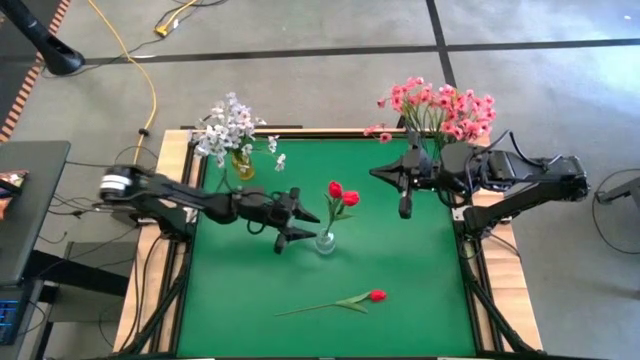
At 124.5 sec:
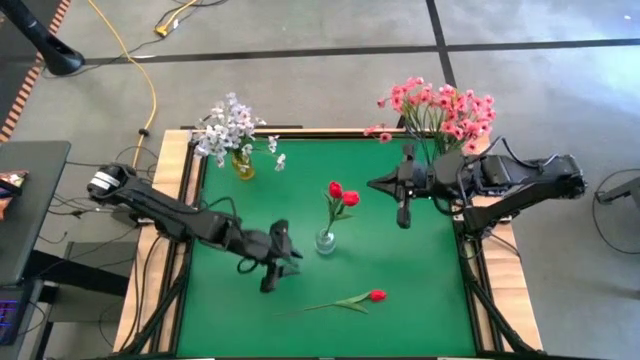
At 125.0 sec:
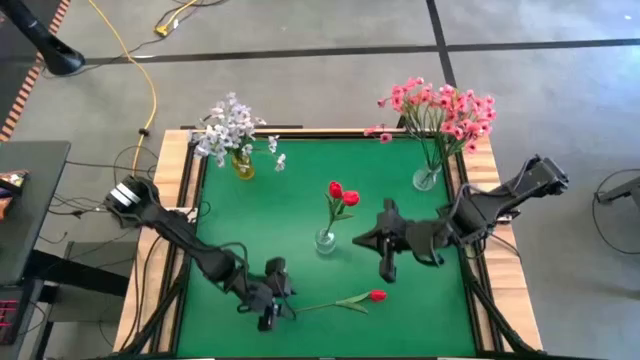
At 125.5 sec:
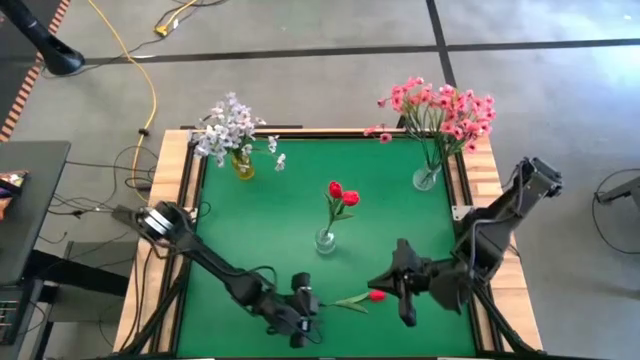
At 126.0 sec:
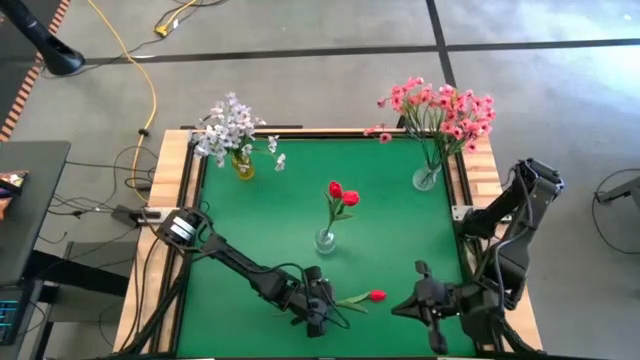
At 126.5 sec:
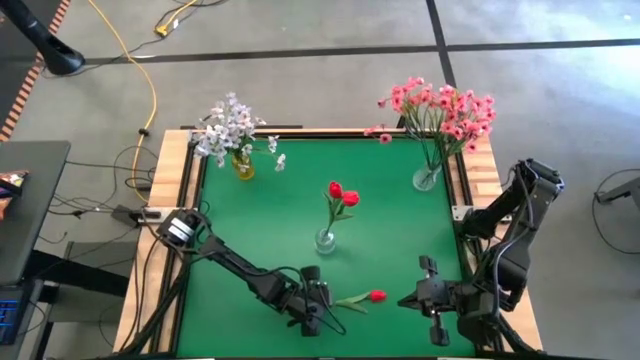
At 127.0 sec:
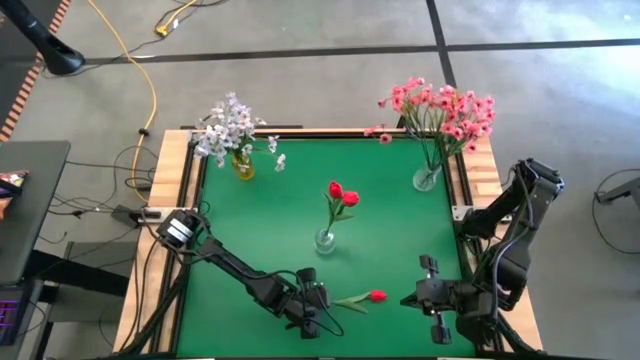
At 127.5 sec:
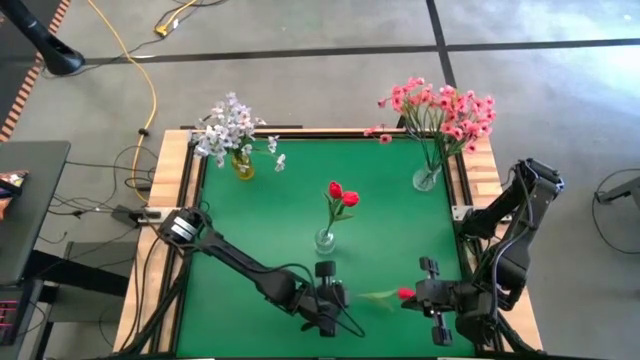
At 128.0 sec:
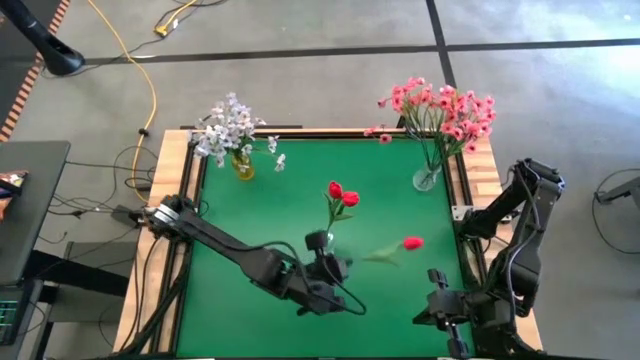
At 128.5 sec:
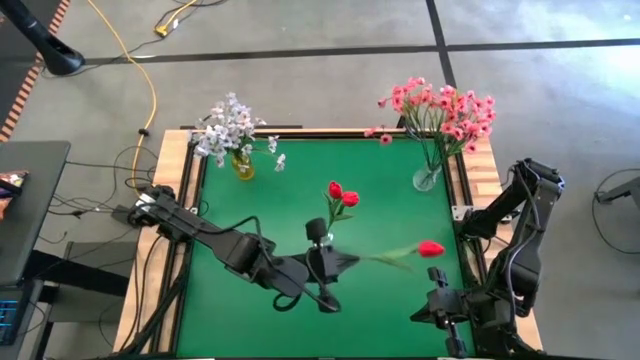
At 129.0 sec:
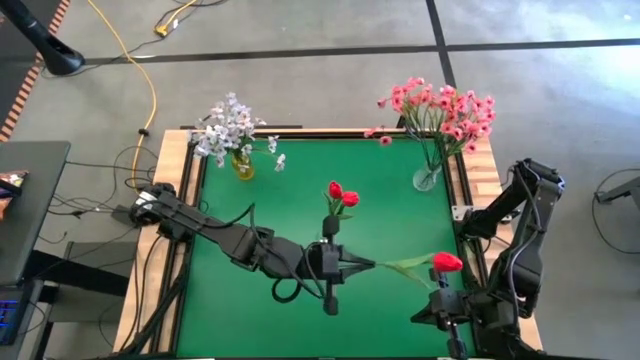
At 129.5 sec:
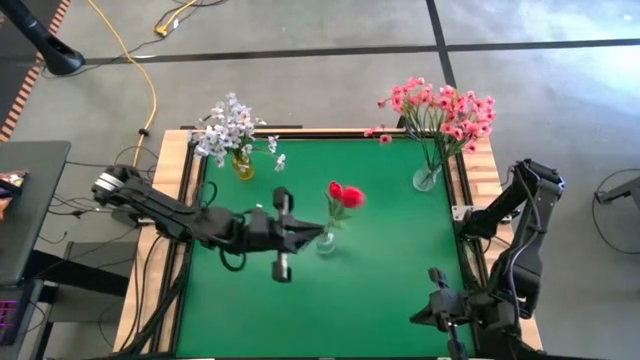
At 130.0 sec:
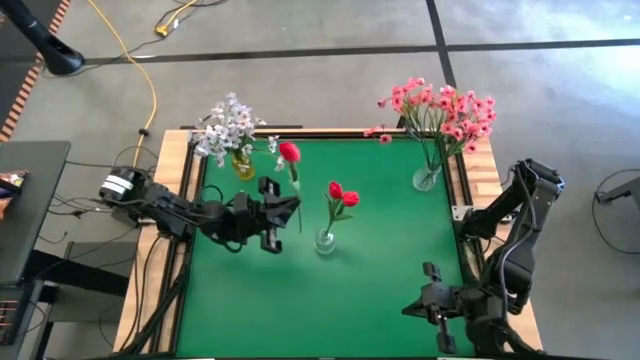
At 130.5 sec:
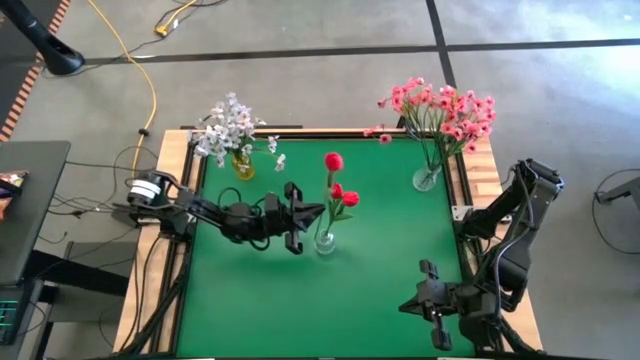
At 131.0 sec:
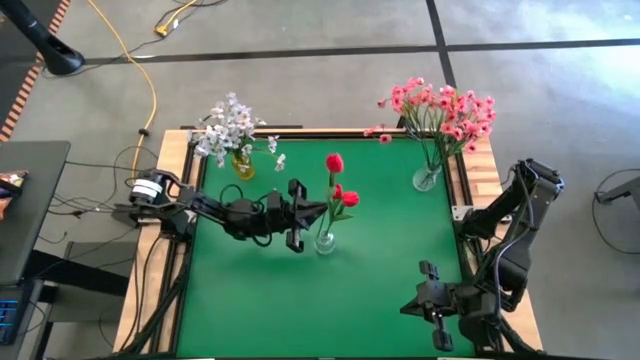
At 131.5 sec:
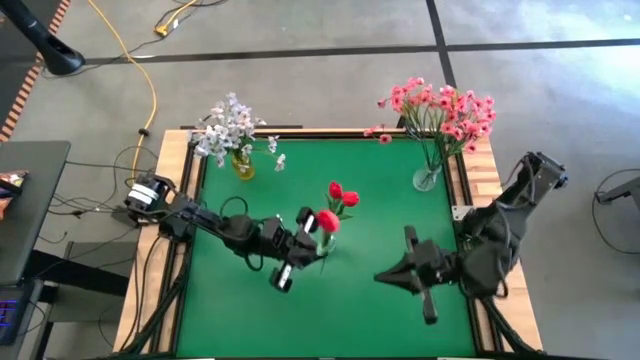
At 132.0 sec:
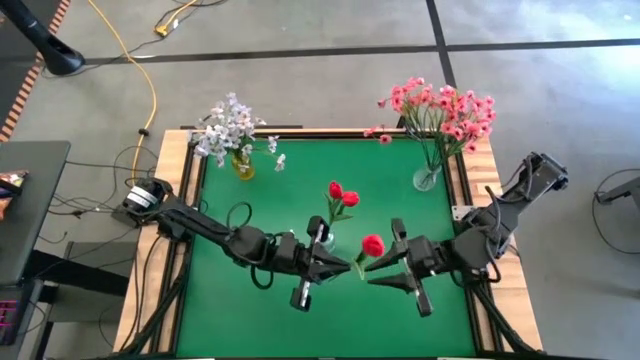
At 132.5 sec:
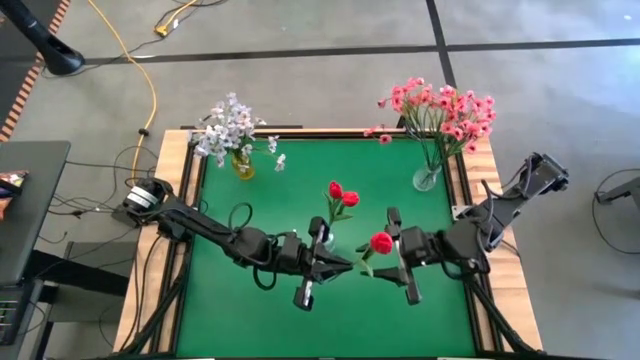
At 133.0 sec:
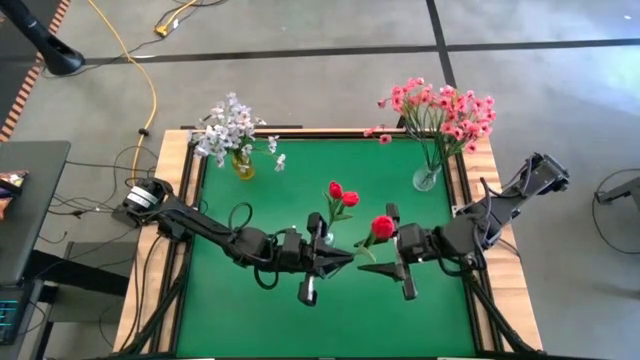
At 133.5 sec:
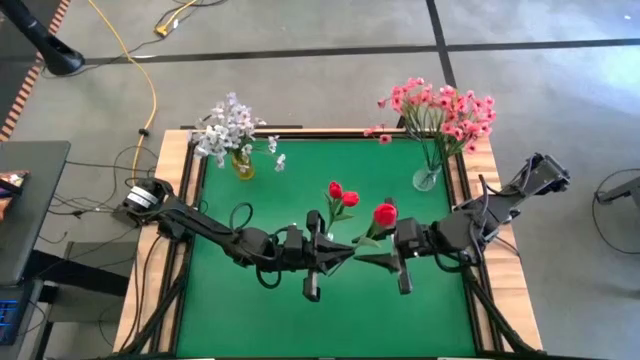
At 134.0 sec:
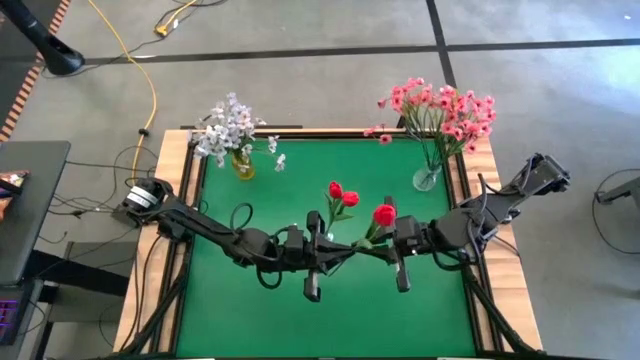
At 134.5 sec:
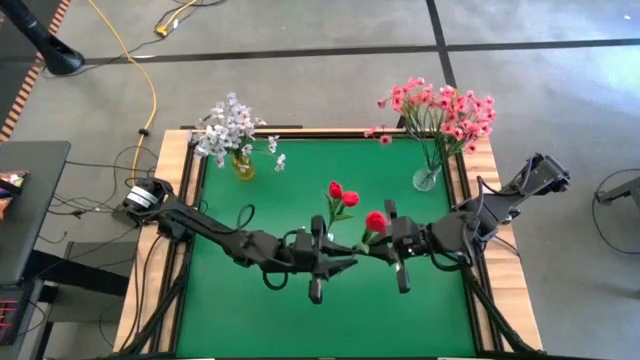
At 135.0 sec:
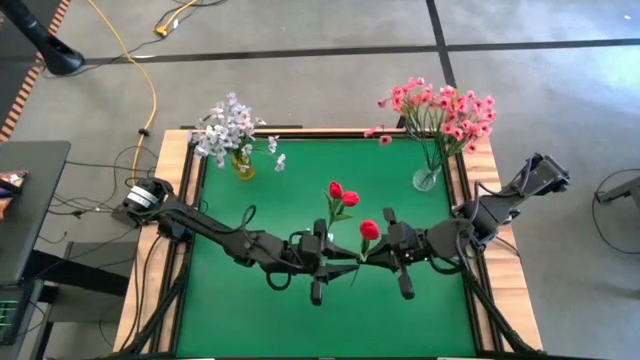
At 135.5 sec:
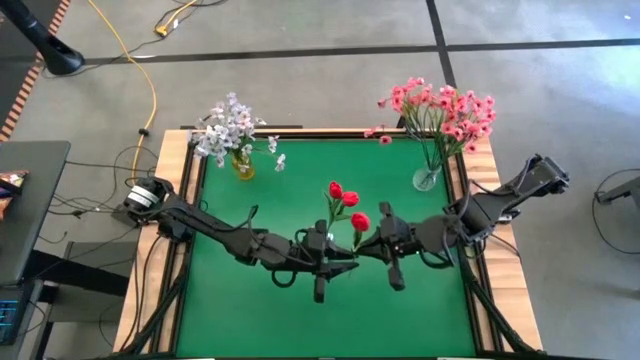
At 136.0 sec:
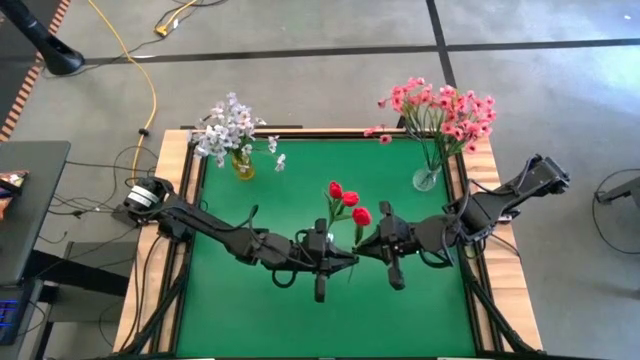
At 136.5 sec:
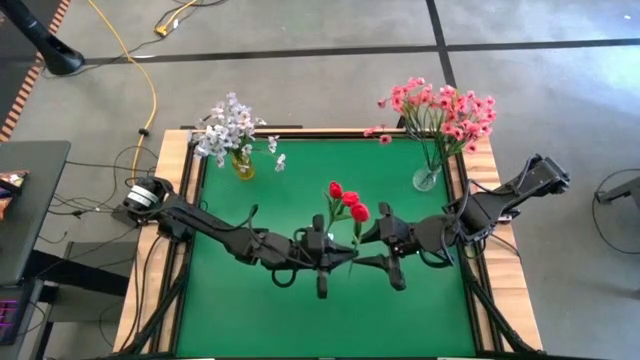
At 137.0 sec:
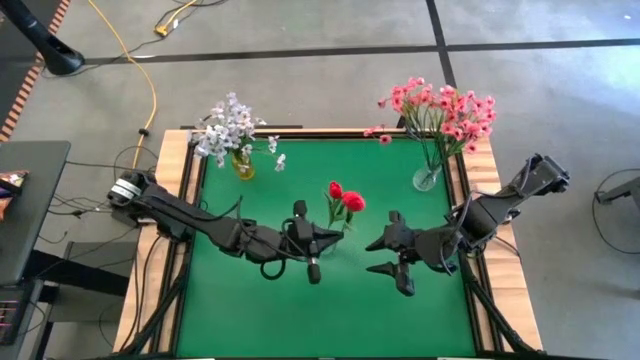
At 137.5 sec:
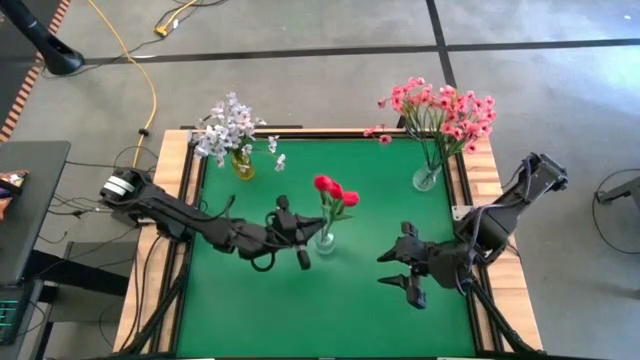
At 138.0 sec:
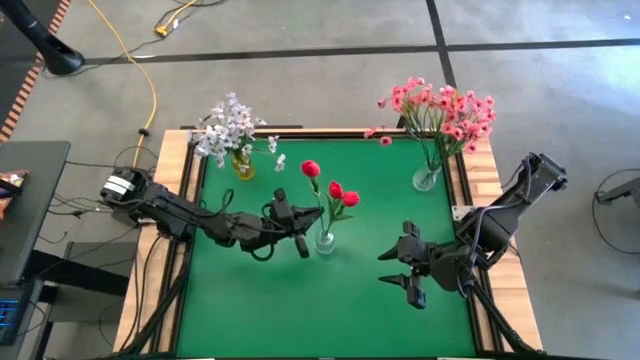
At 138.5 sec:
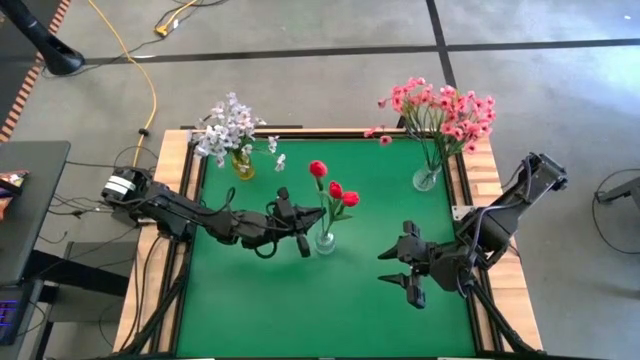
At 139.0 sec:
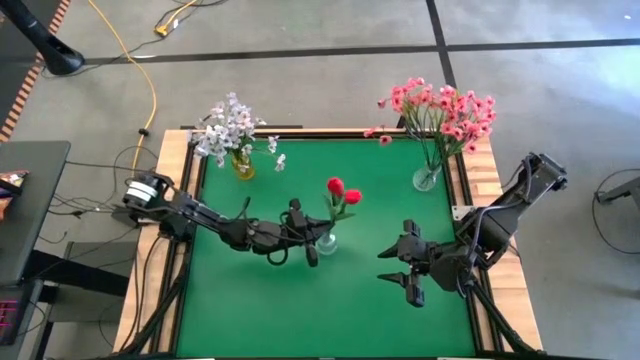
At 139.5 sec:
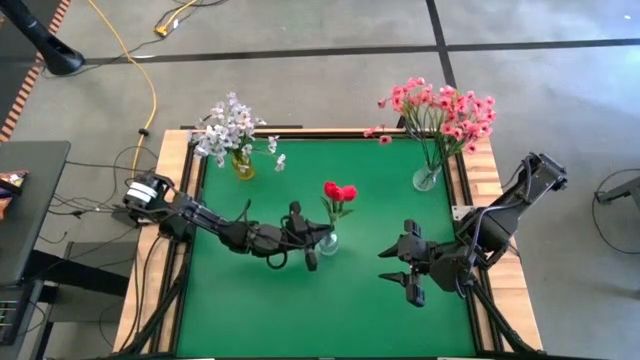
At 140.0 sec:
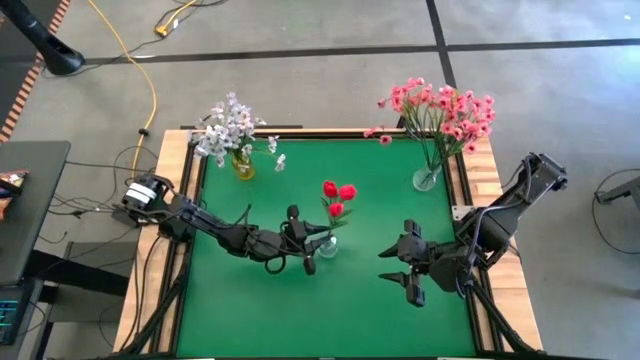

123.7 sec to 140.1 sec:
Task: Sort flowers into vase by color
Put the red flower into the bottom transparent vase

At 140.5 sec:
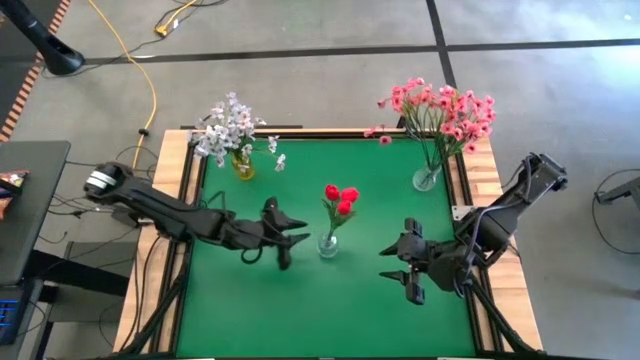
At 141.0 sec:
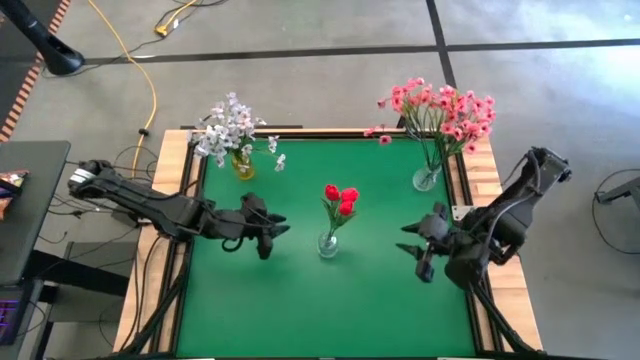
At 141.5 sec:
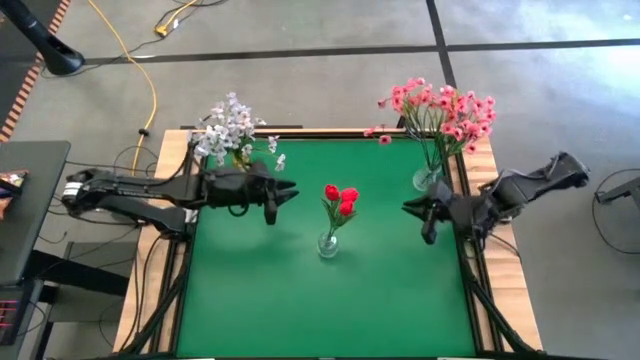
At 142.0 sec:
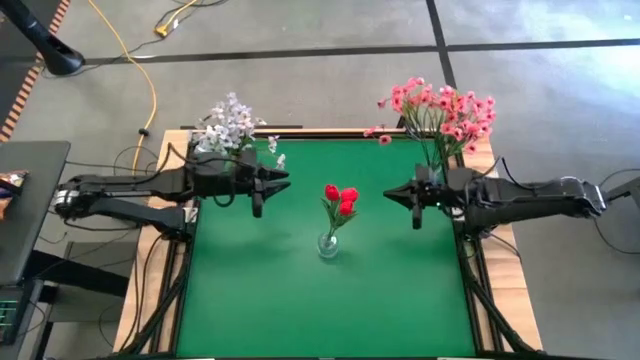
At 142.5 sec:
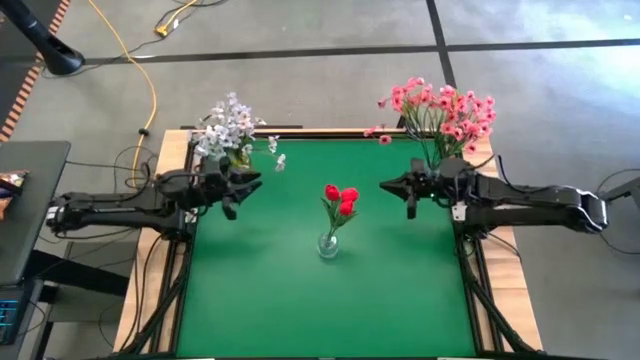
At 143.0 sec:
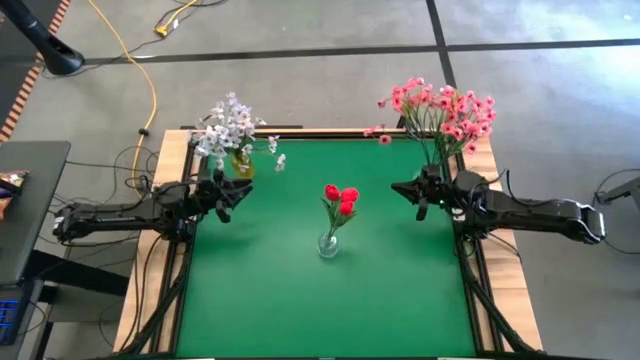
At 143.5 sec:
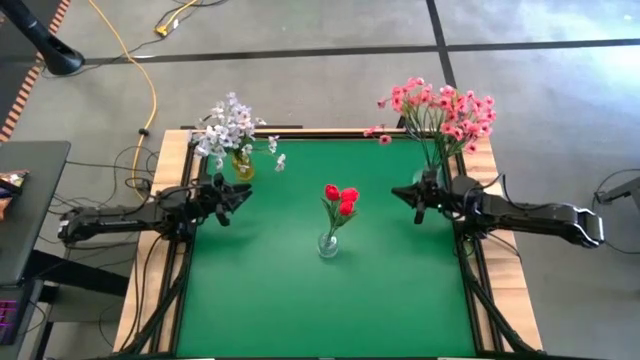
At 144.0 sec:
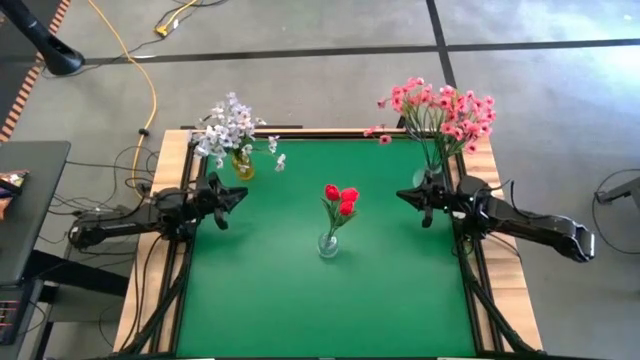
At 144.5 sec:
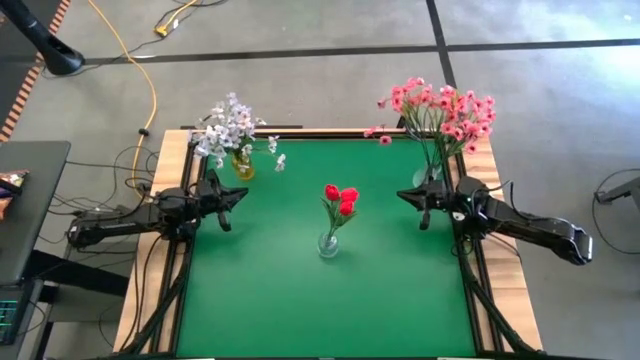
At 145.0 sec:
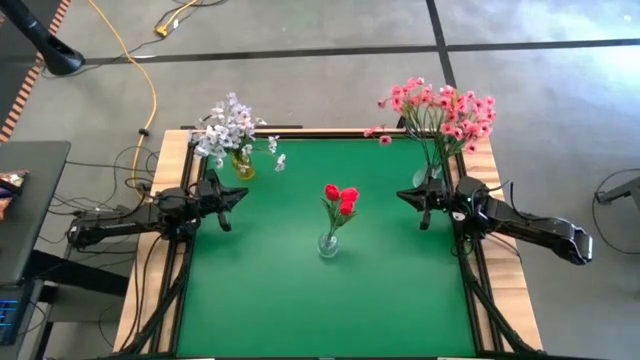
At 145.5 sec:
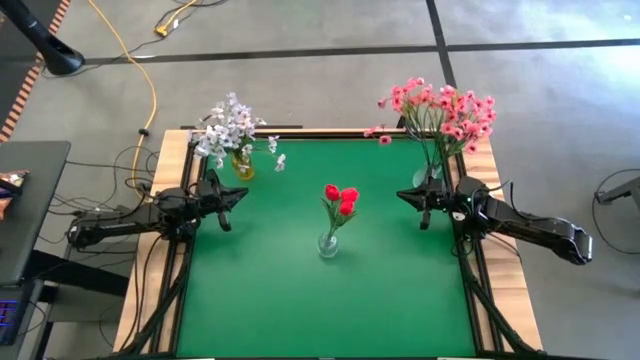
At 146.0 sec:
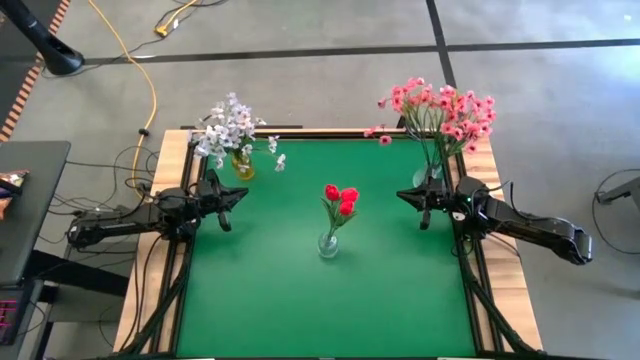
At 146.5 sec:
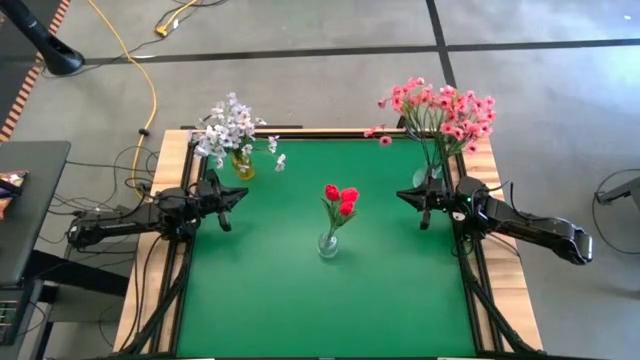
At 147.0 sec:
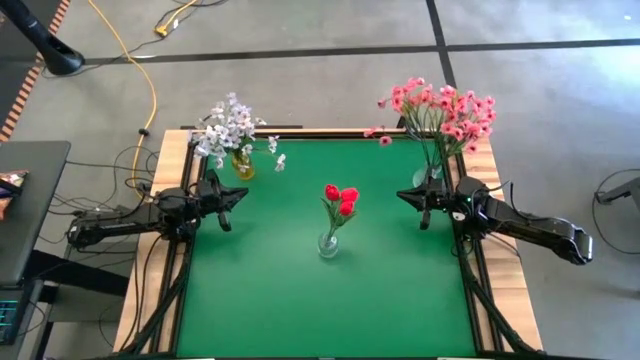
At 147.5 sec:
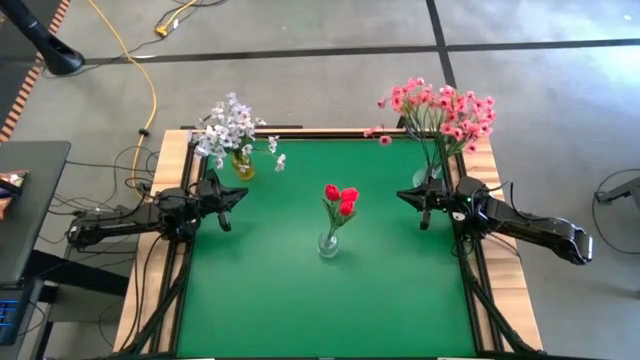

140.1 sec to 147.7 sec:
Return to Home Position
